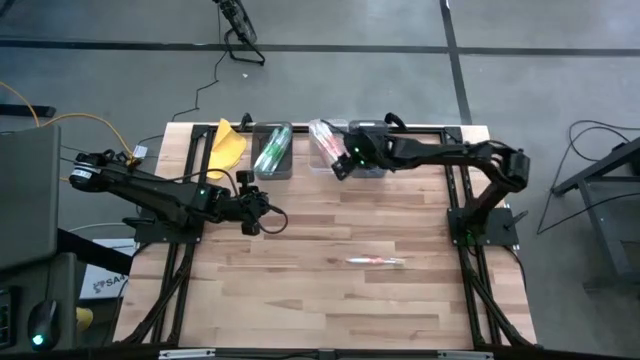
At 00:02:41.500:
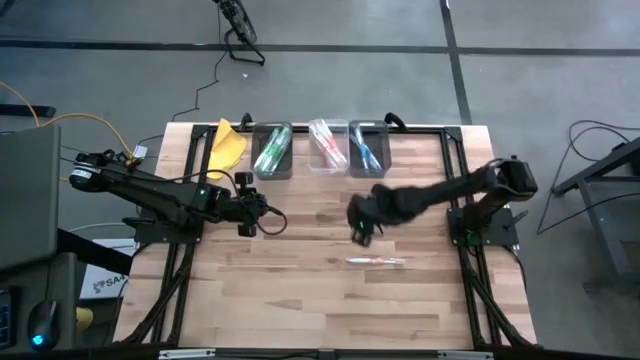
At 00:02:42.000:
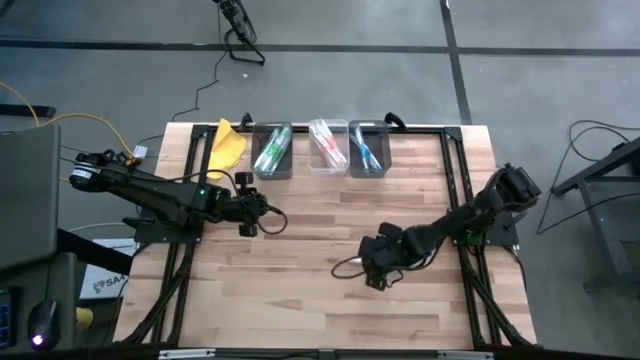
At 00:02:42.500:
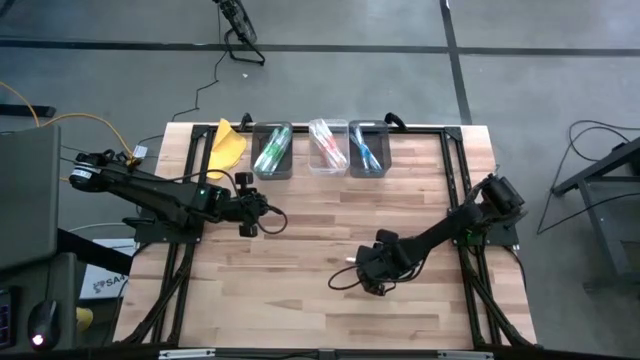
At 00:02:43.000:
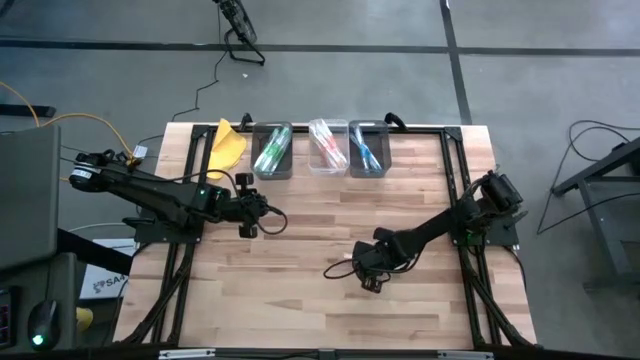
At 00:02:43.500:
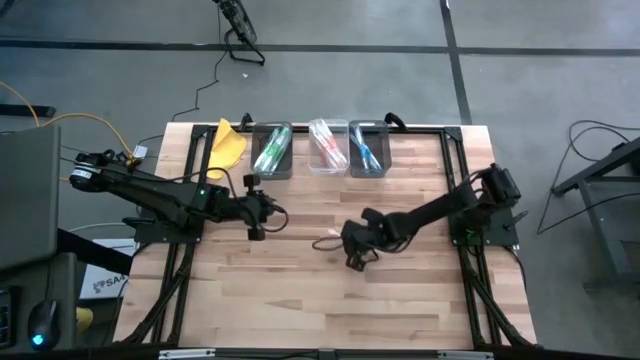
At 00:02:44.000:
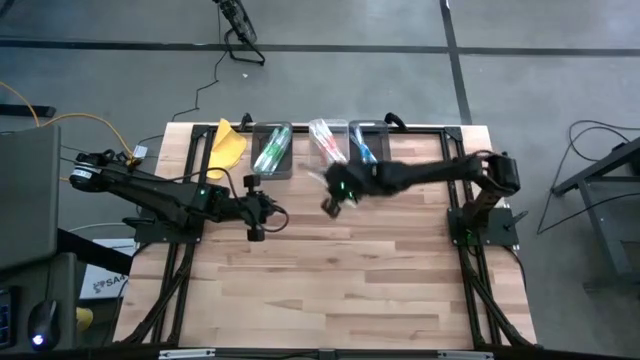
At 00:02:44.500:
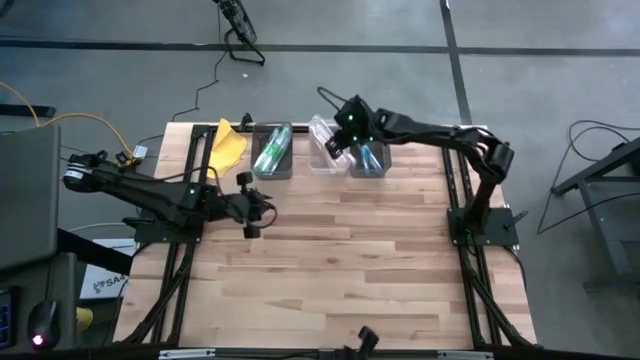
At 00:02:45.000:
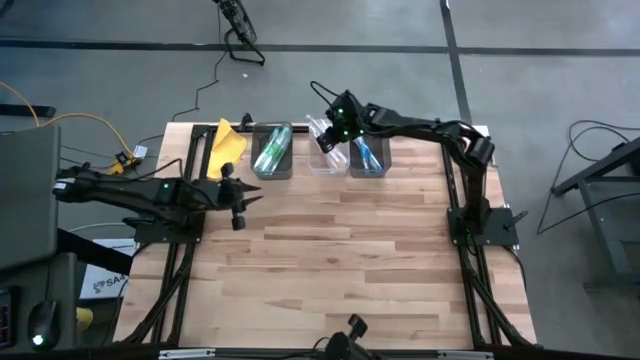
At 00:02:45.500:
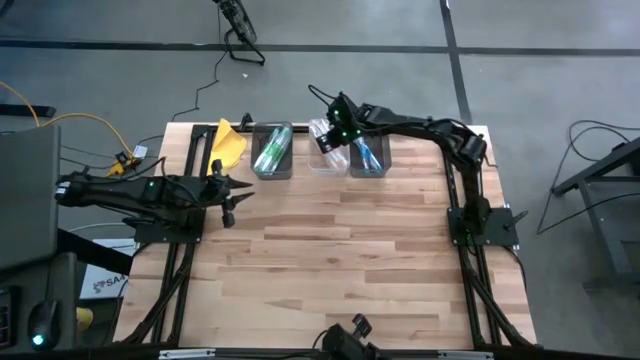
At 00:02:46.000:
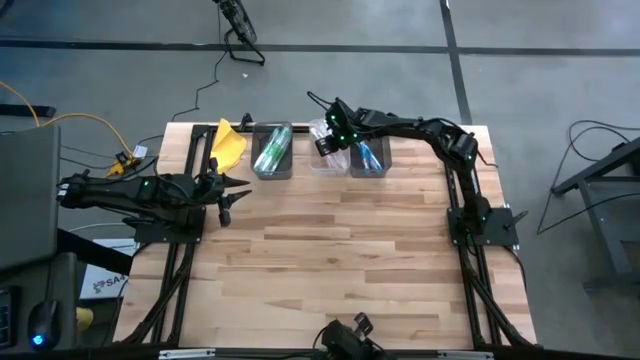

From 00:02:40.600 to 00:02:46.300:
Task: Pick & Place Toothbrushes
Put the orange toothbrush into the transparent bin

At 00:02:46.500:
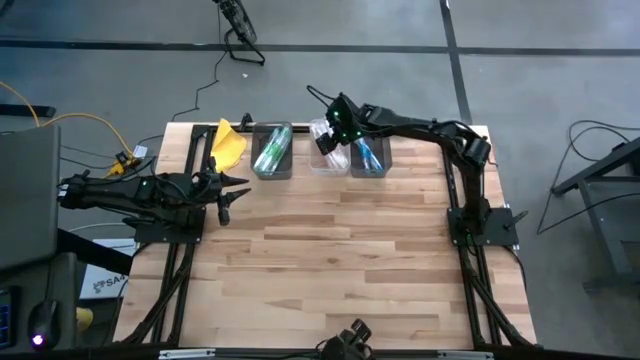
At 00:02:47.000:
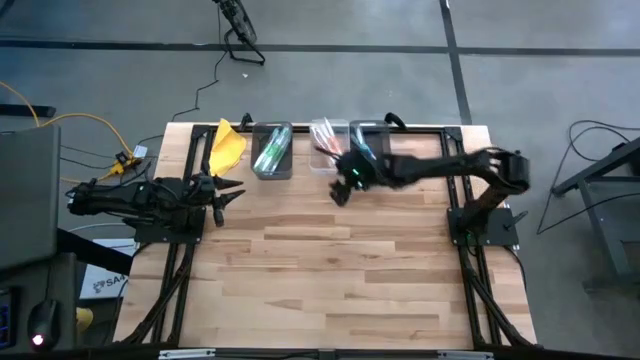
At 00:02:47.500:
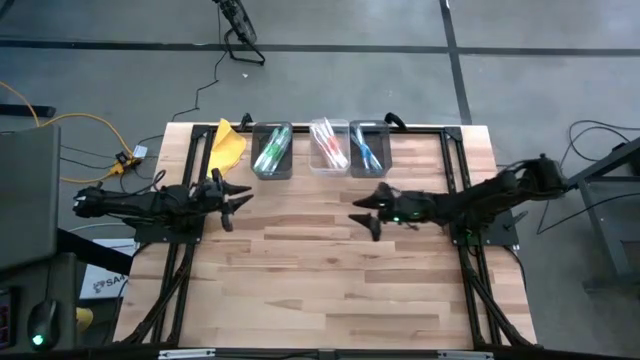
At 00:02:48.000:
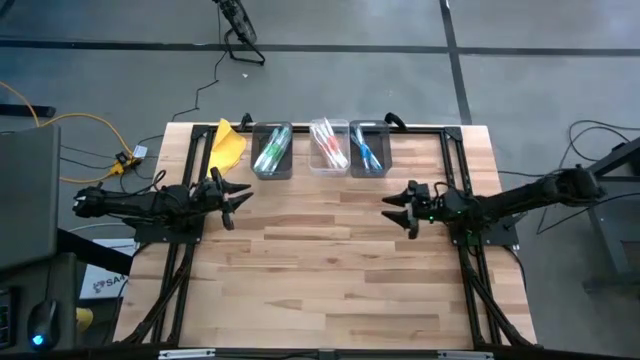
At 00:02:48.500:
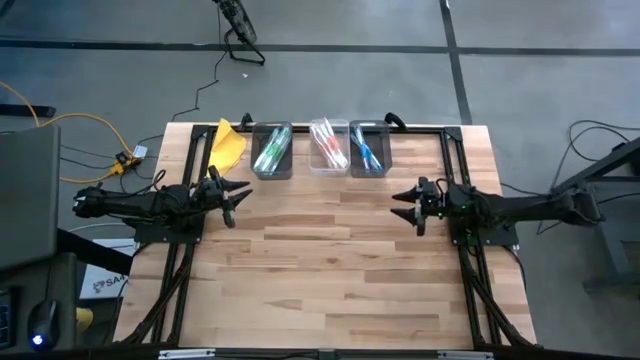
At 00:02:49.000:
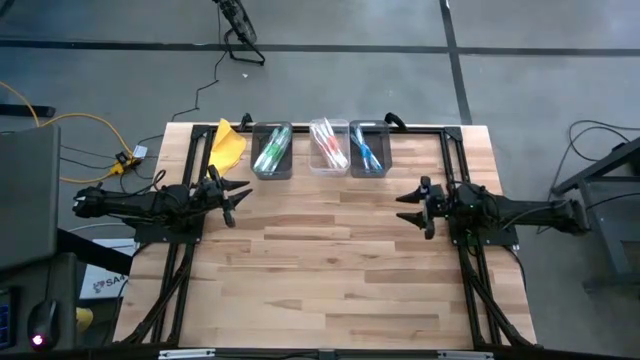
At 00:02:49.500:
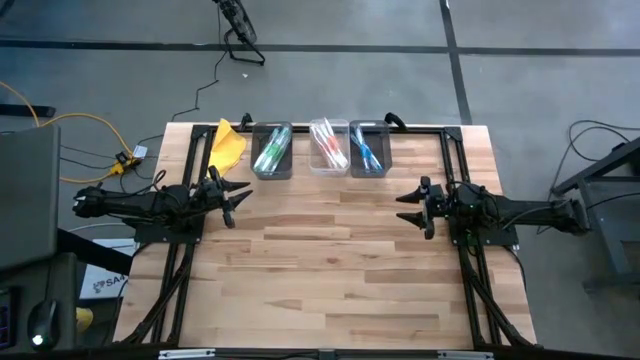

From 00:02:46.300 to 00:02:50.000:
Return to Home Position

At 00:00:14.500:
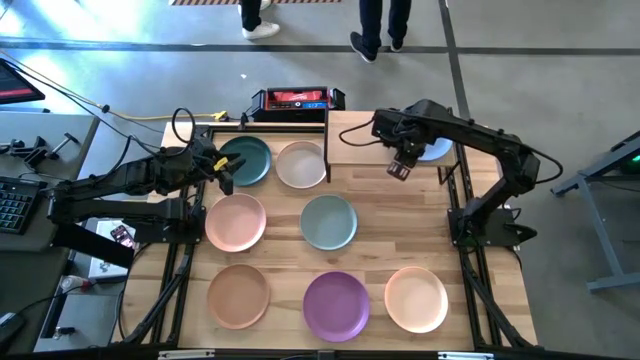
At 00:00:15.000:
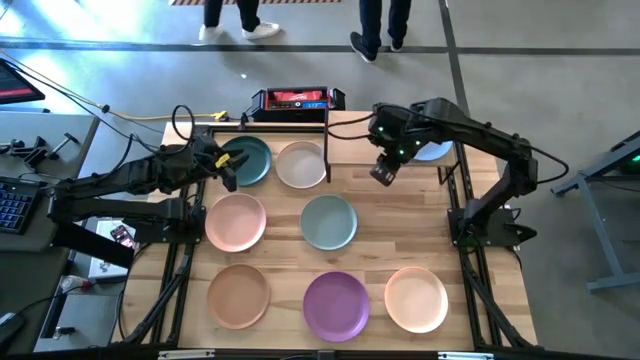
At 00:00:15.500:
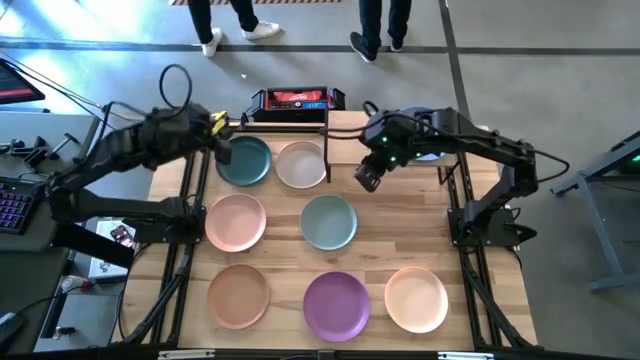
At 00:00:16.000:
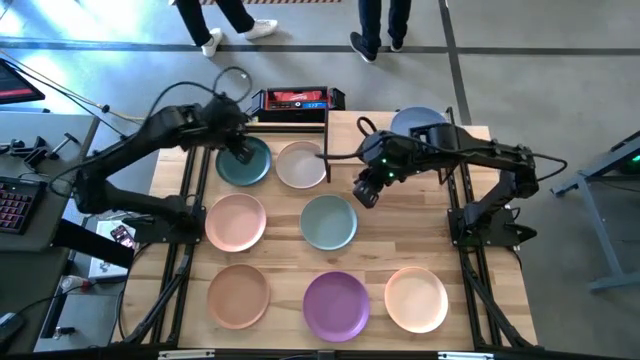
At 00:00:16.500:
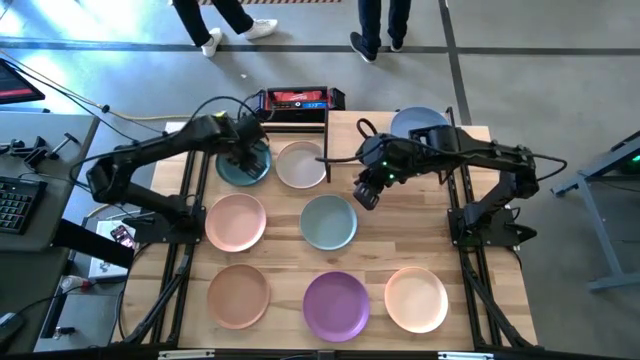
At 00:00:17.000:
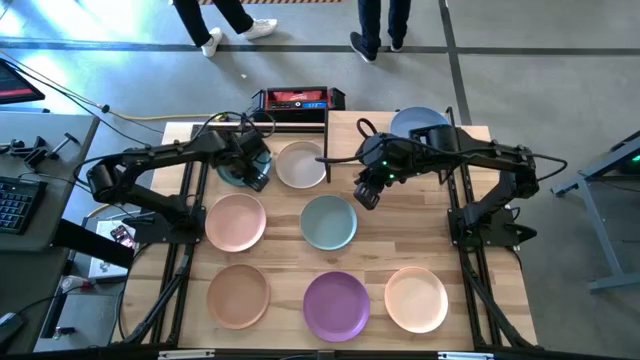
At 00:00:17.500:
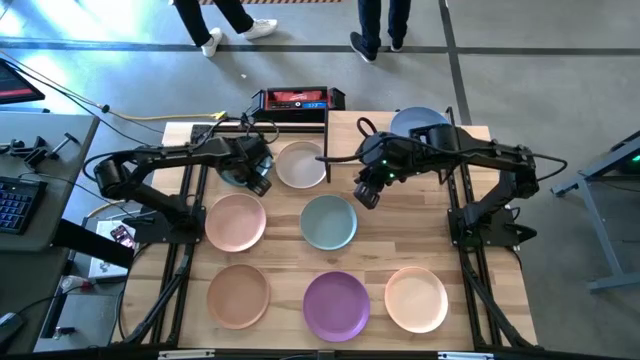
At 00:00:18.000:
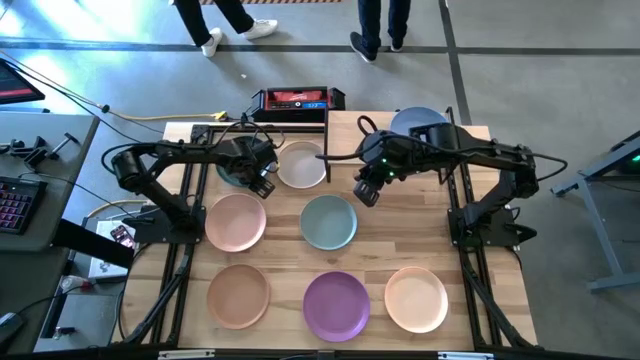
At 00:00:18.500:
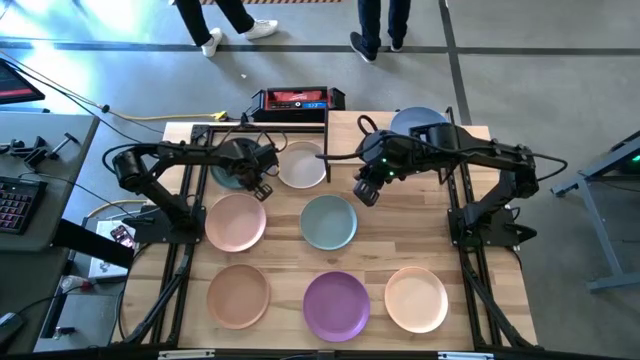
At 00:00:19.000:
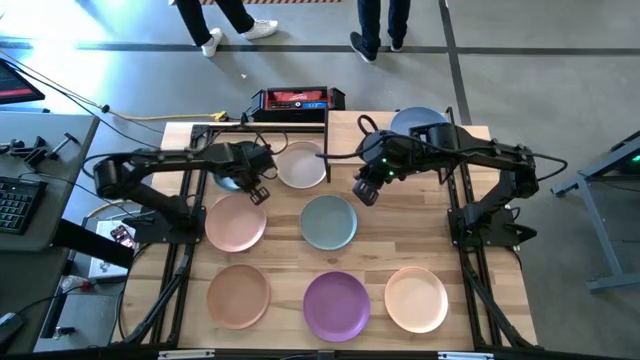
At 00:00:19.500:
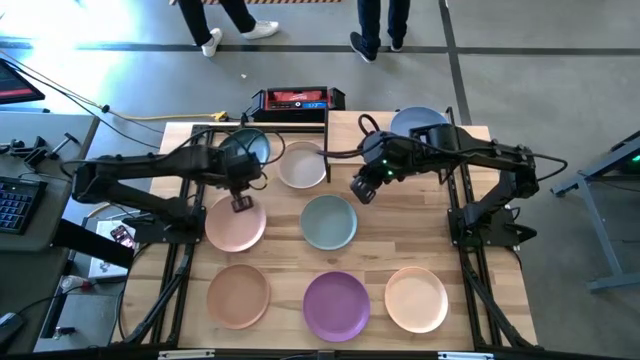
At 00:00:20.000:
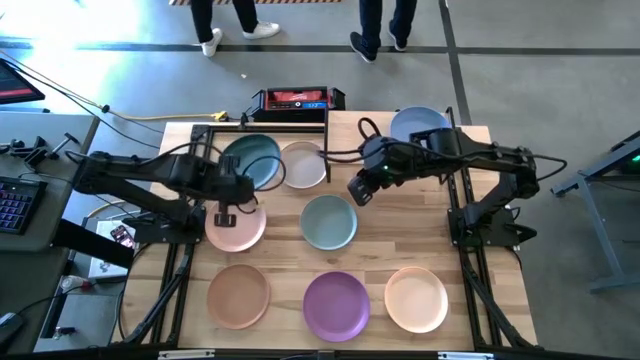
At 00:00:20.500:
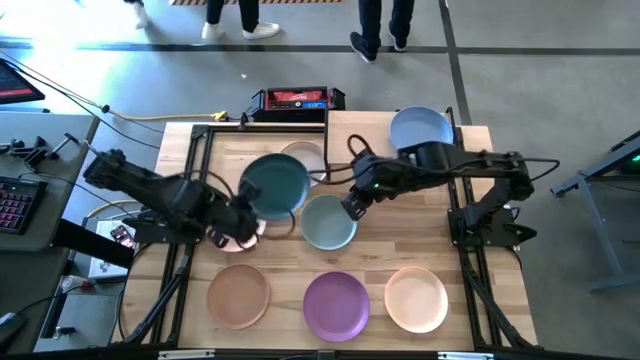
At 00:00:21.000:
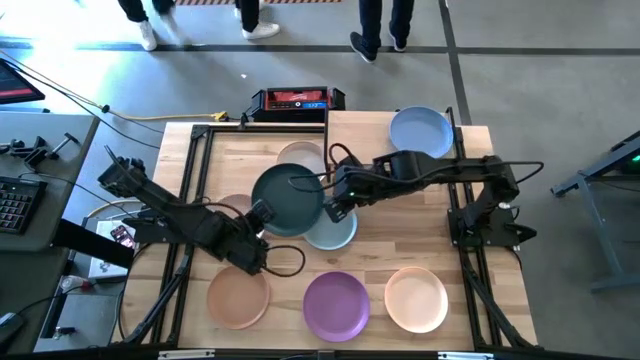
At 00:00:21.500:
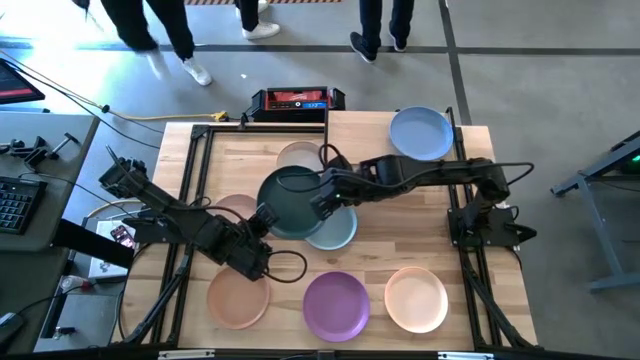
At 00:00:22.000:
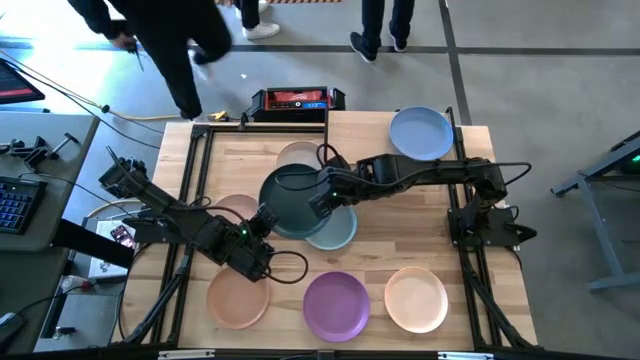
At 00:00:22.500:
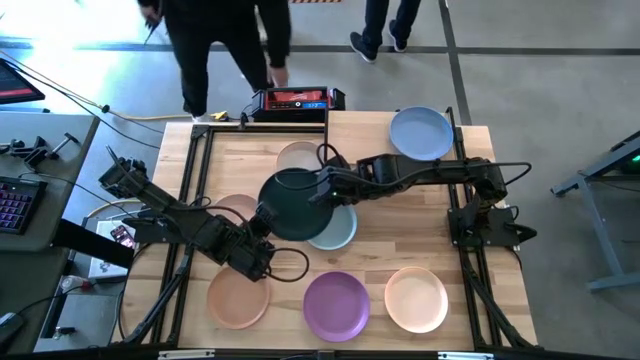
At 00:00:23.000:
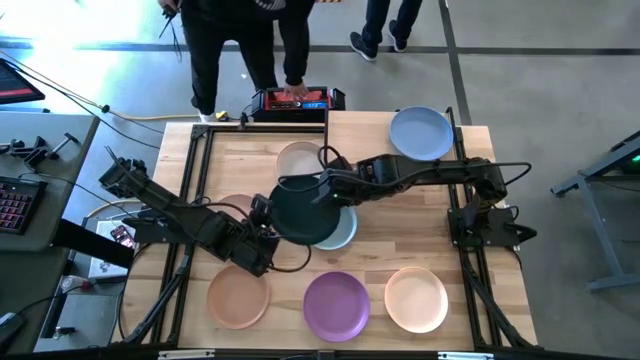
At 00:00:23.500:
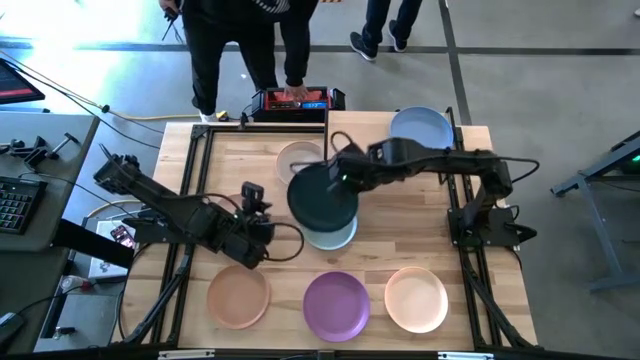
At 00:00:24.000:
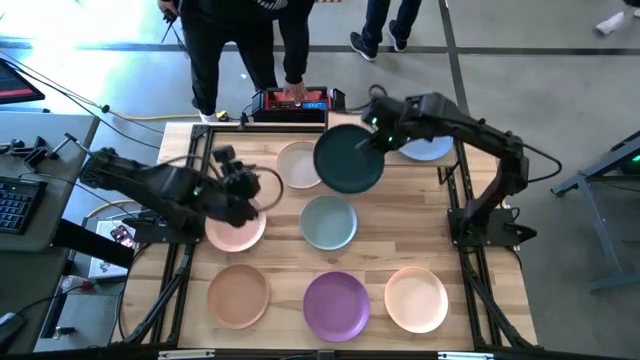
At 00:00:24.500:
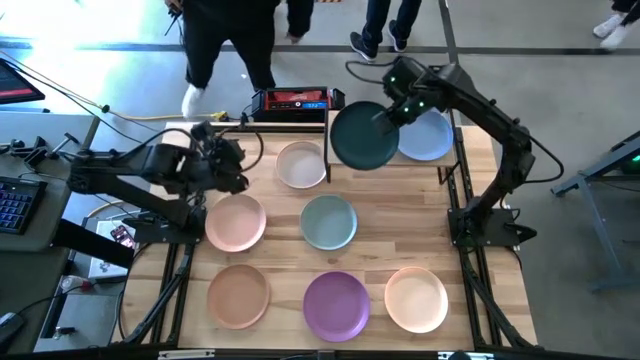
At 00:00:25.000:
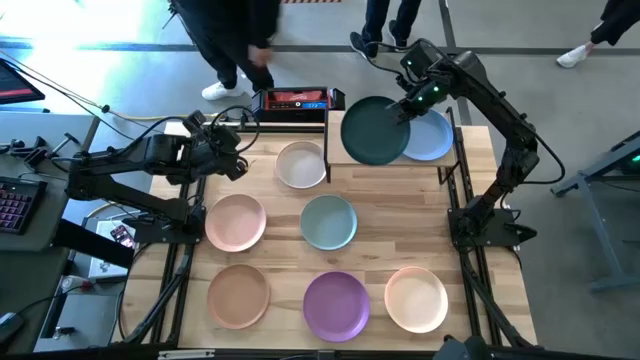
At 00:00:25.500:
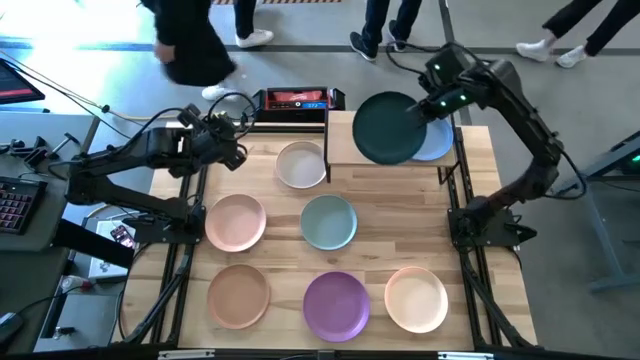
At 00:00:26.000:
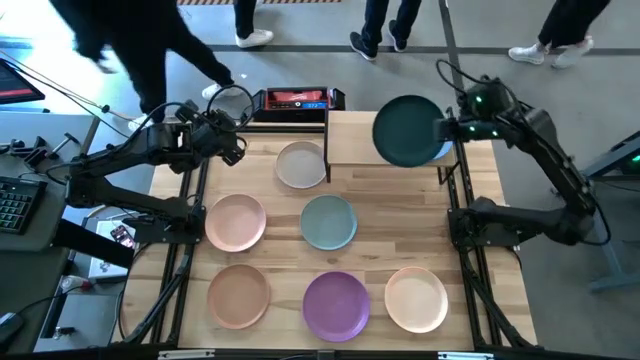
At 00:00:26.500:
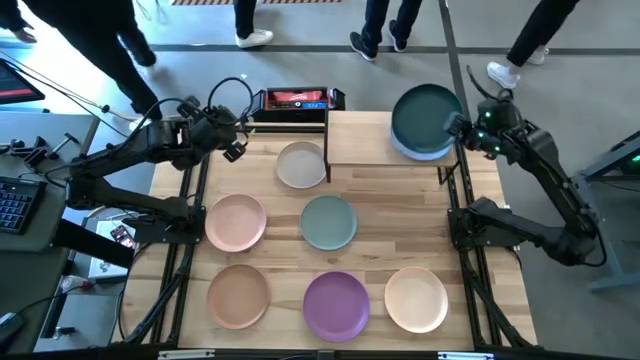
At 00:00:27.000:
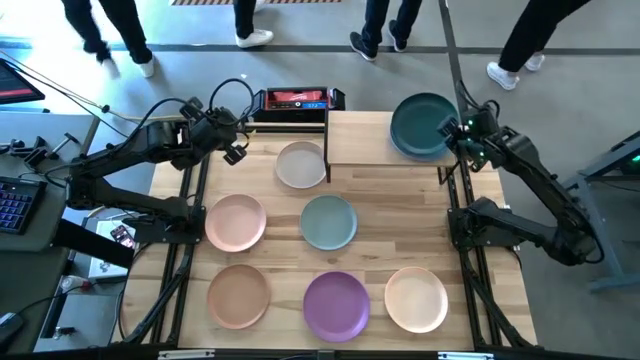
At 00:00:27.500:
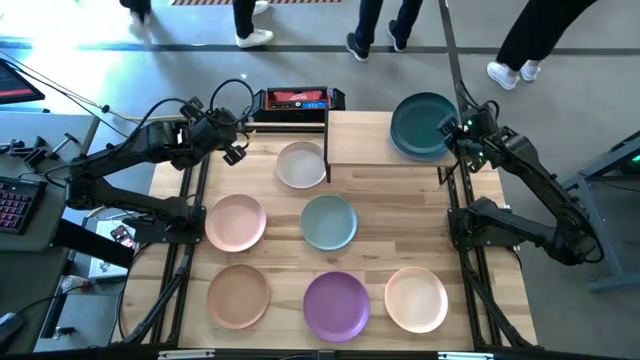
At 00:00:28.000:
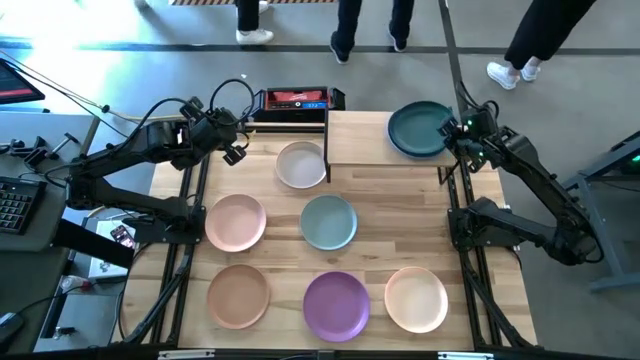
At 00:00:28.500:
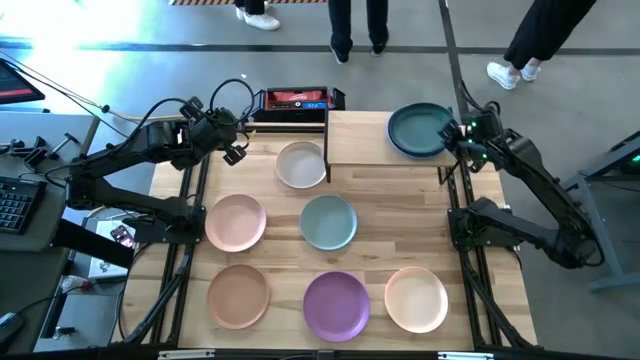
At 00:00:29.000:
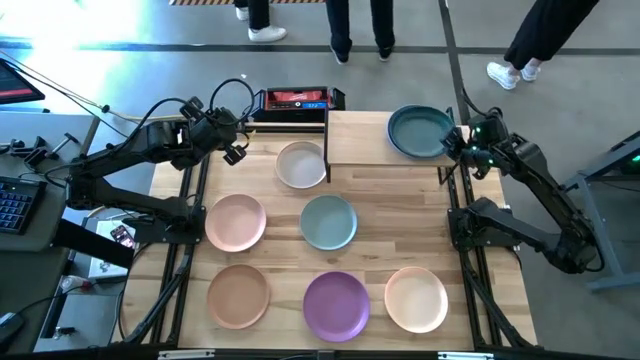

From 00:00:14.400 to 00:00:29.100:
Task: Place and stack plates onto a shelf
Stack the green plate on top of the blue plate on the shelf
